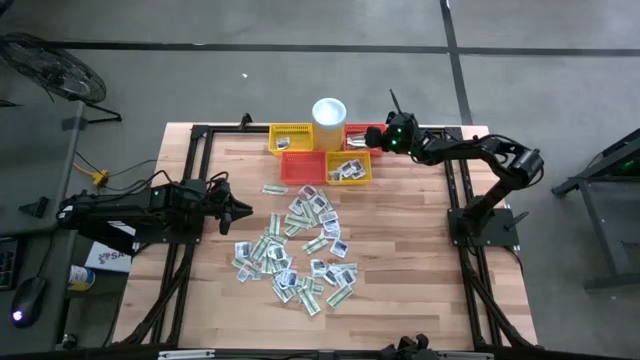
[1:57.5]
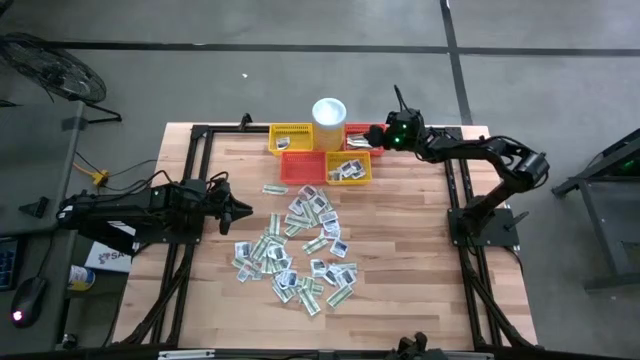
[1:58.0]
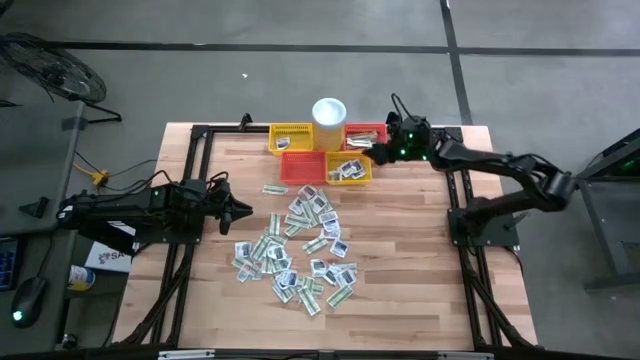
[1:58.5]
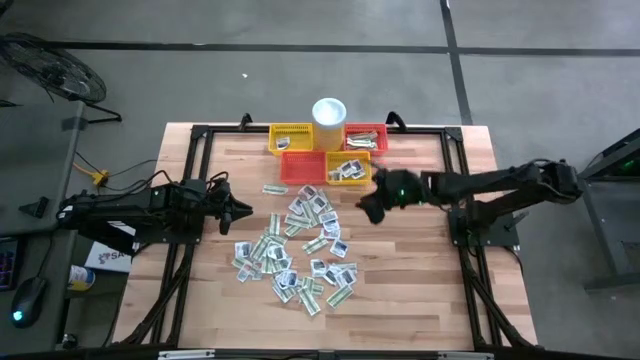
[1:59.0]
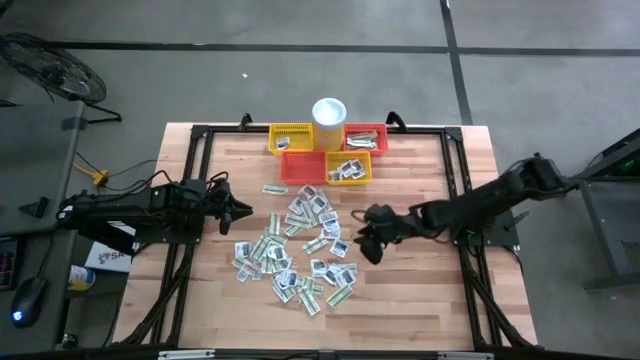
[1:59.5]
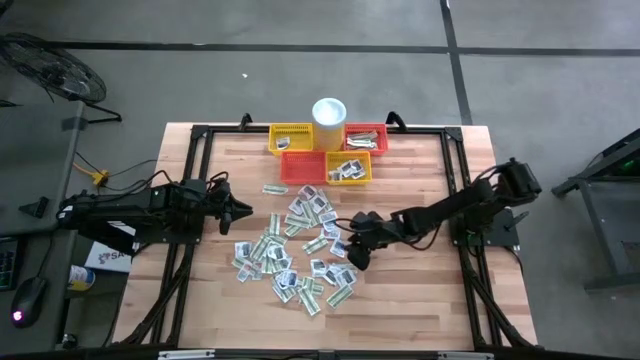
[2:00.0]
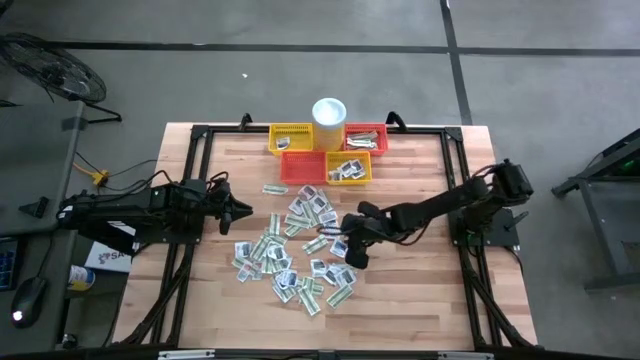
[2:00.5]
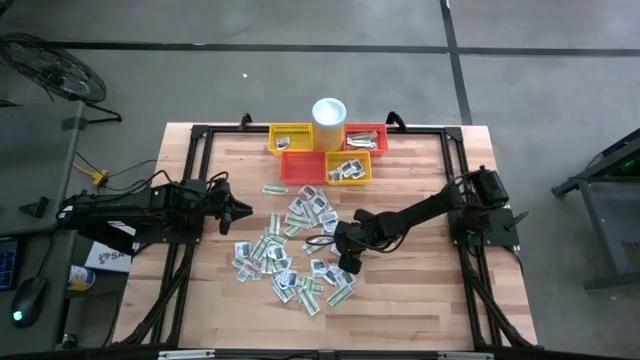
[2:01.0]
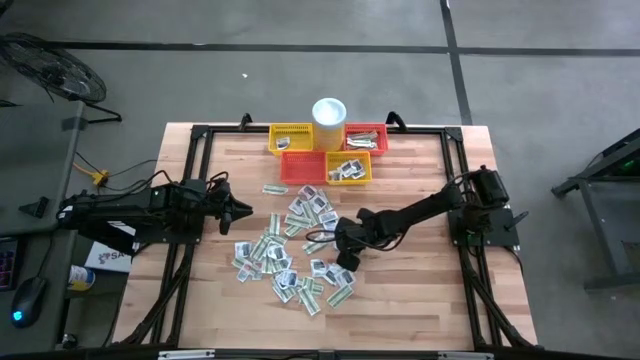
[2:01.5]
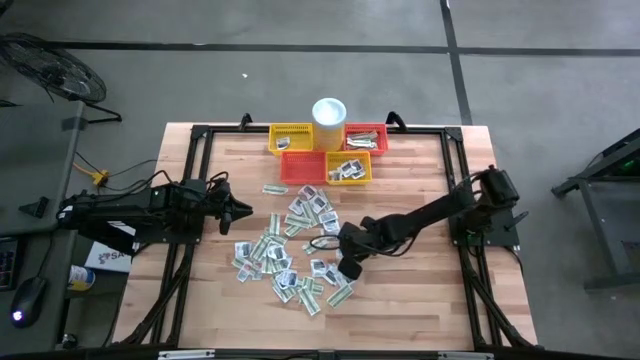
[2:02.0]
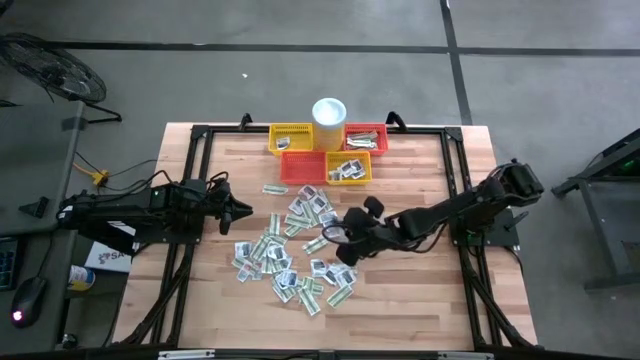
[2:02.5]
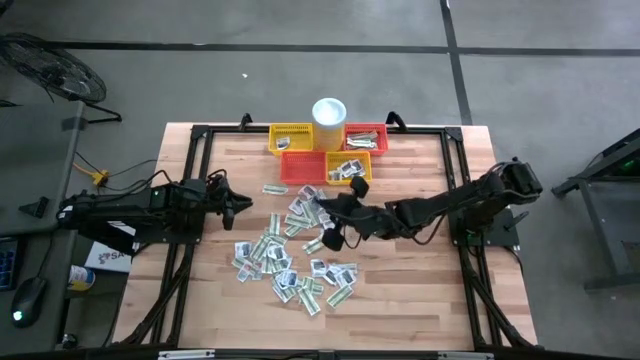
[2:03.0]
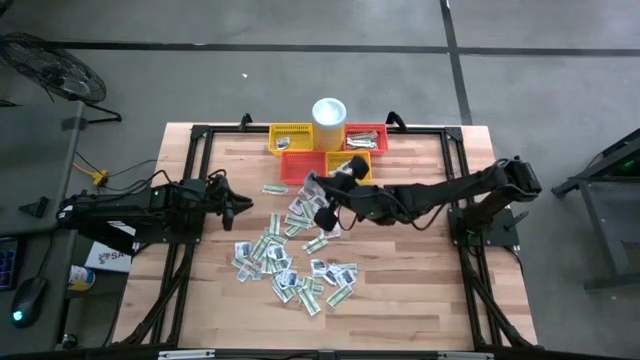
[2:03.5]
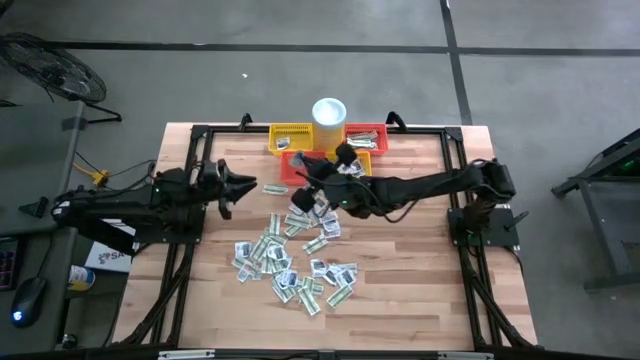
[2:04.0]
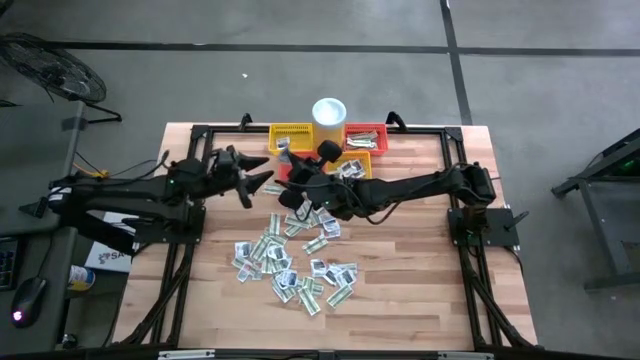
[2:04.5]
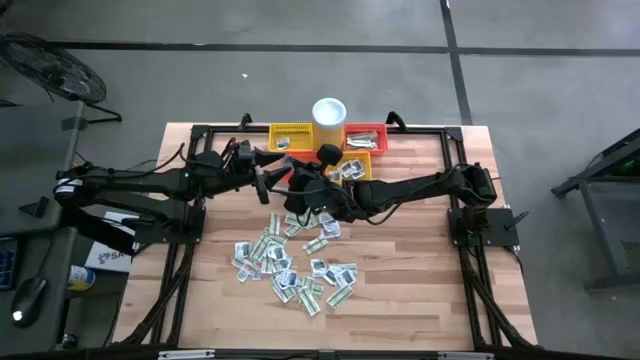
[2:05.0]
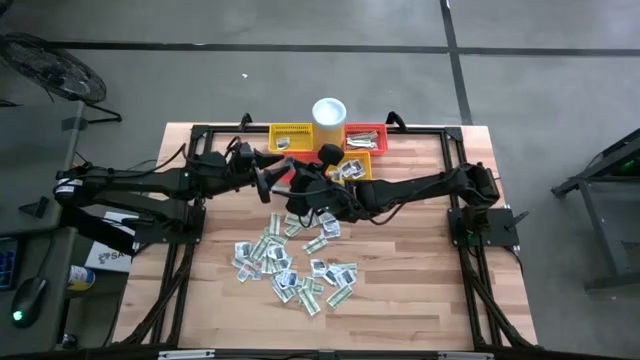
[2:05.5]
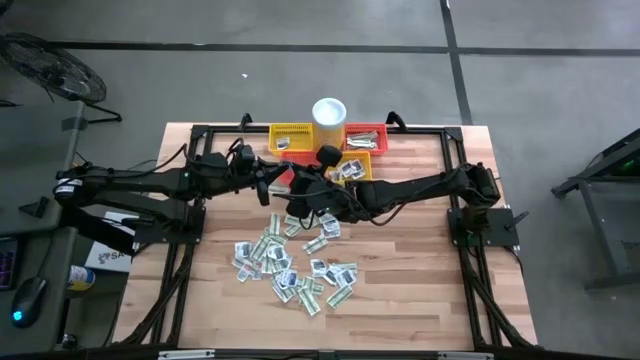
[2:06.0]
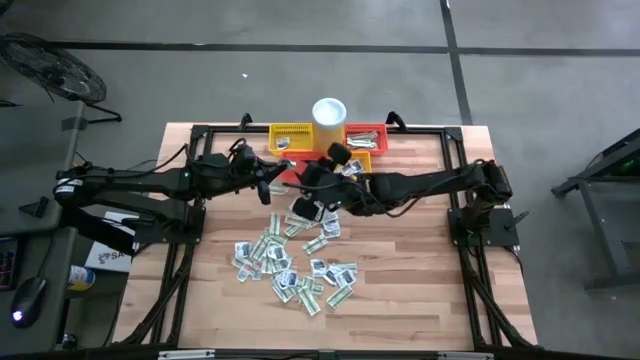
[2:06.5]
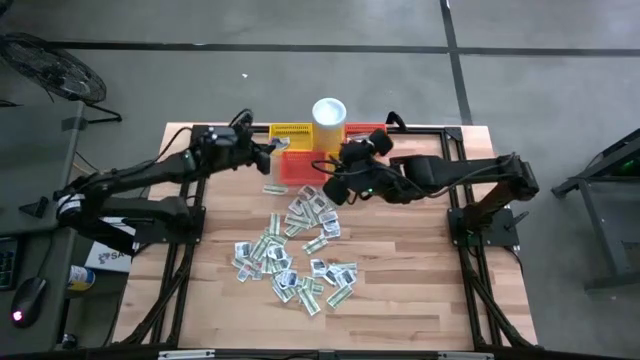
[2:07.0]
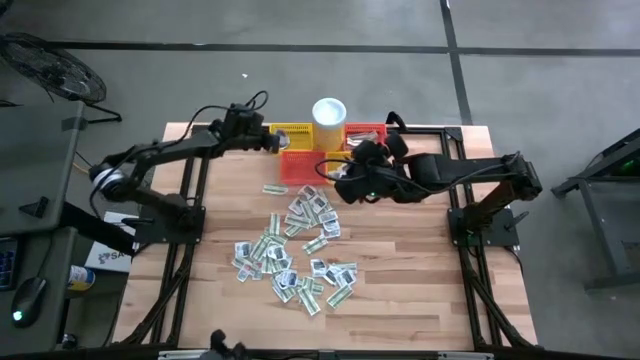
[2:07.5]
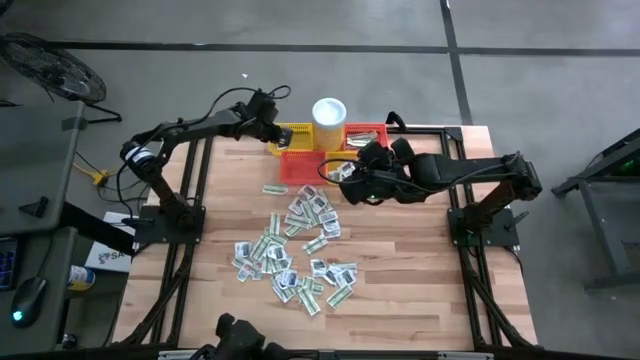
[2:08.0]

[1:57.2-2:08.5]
Task: Pick & Place First Aid Supplies
Put the blue alcohol pad into the top yellow basket

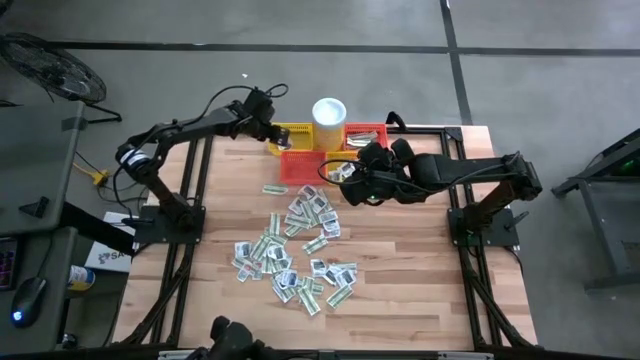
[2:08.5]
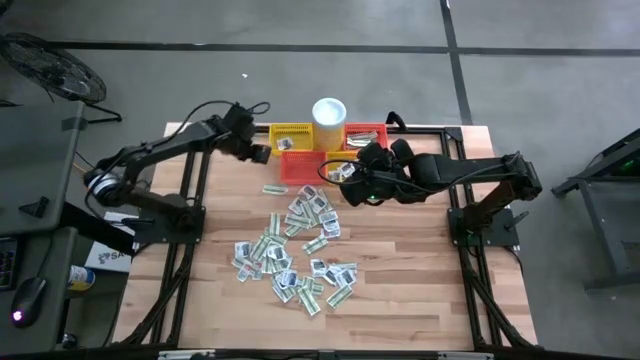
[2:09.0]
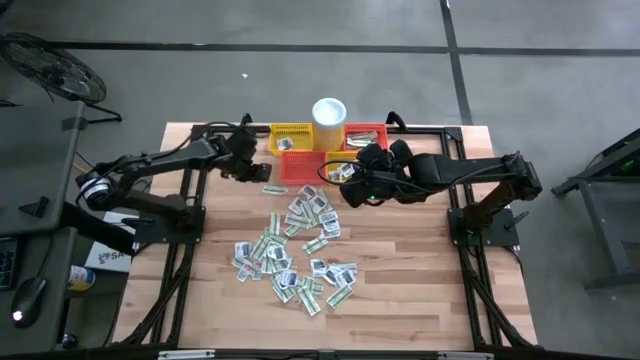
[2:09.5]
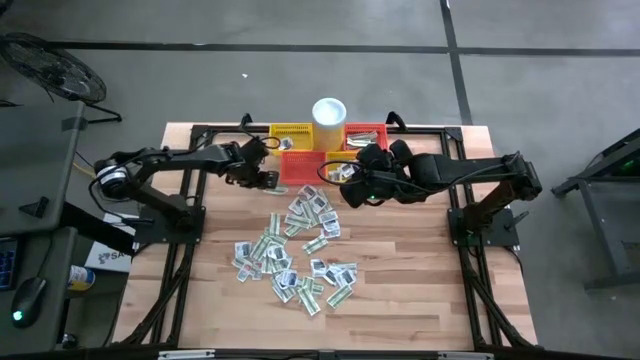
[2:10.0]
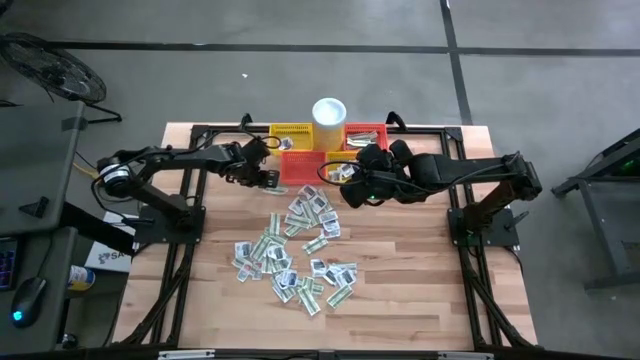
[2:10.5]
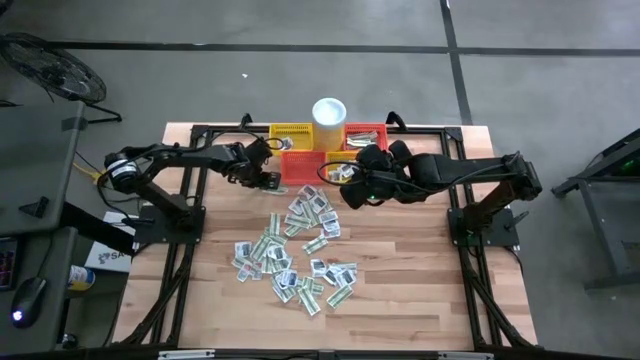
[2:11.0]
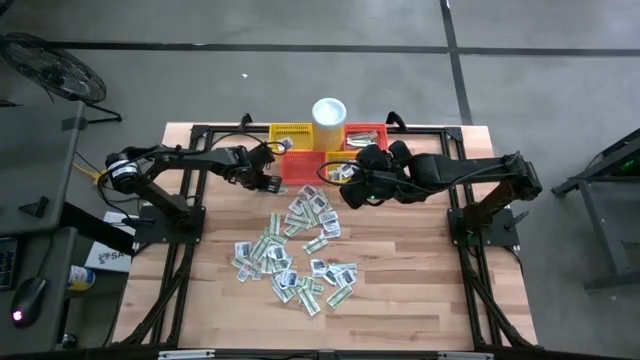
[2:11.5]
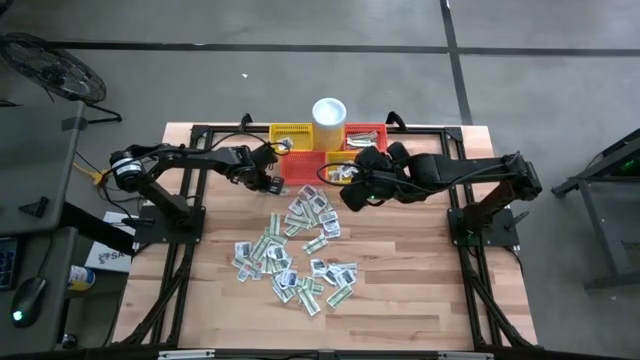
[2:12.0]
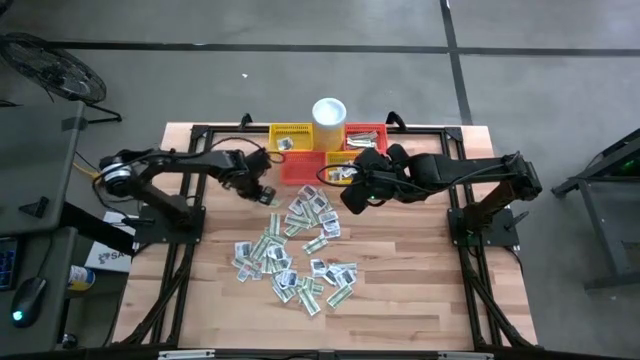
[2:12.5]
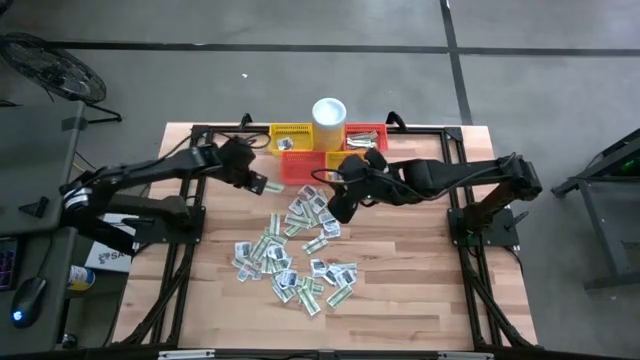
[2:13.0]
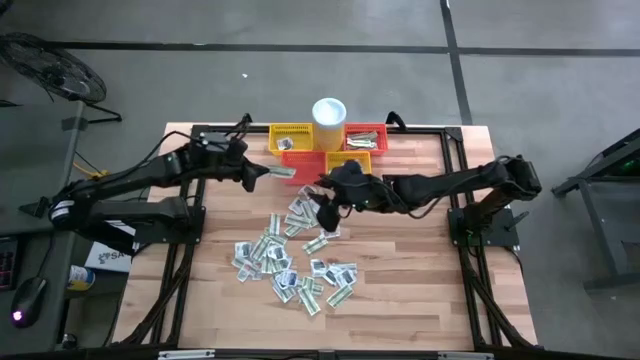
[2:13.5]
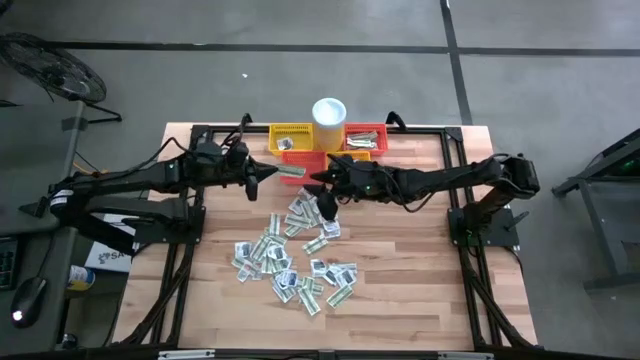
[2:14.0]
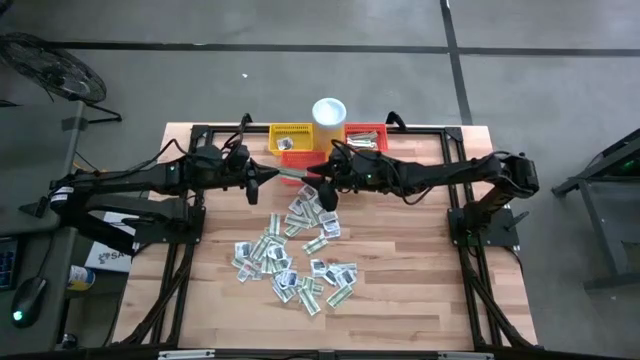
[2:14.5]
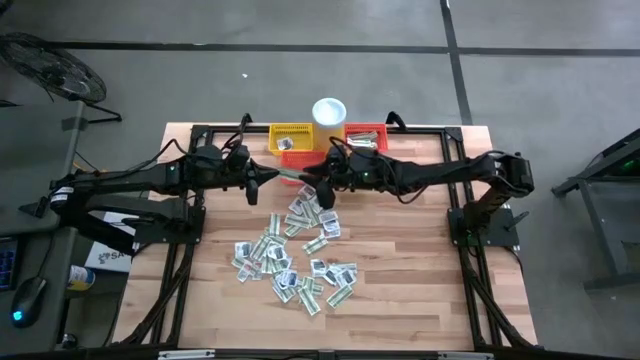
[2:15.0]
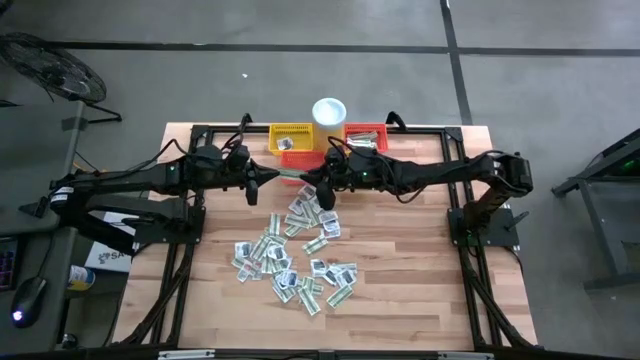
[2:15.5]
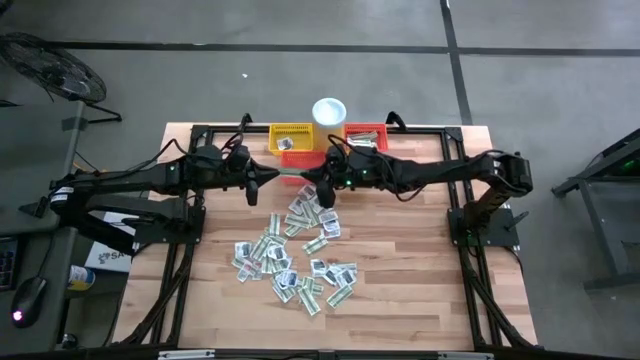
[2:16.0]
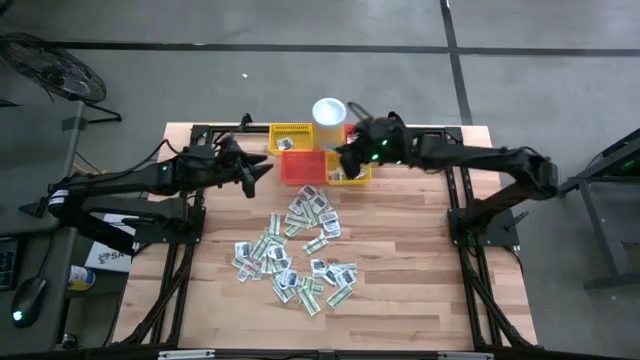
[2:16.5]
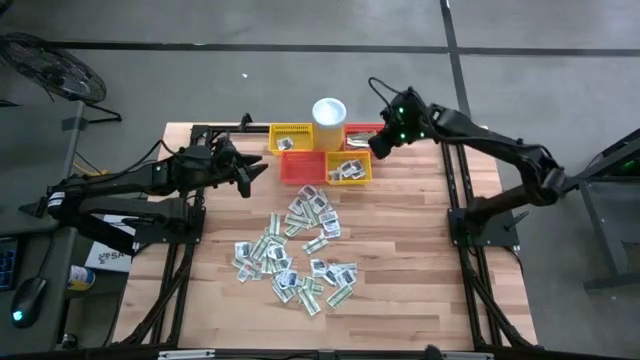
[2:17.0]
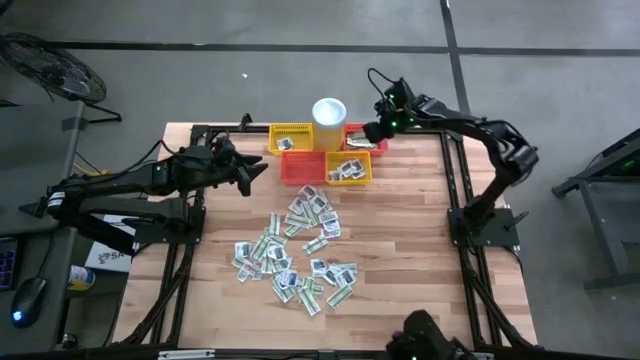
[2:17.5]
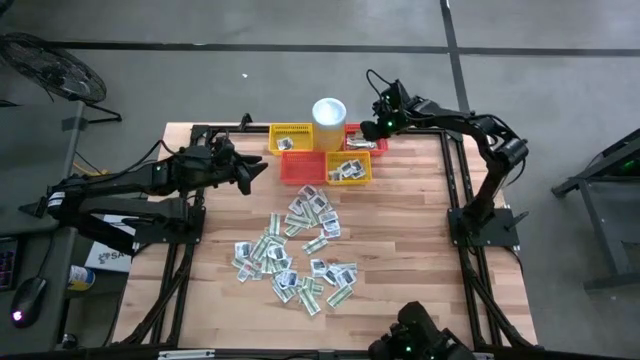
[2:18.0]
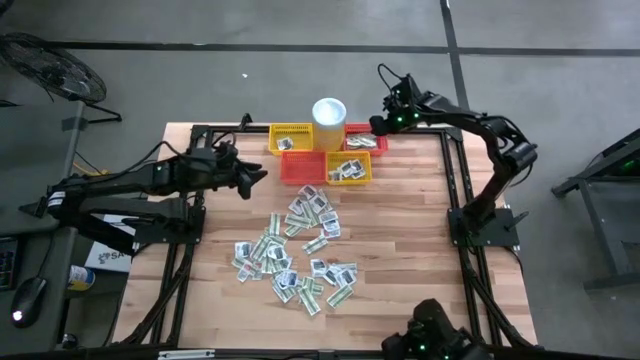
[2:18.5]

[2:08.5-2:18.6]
Put the green bandage pack into the top orange basket
